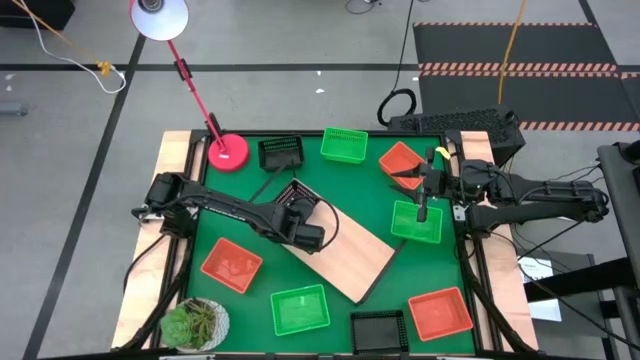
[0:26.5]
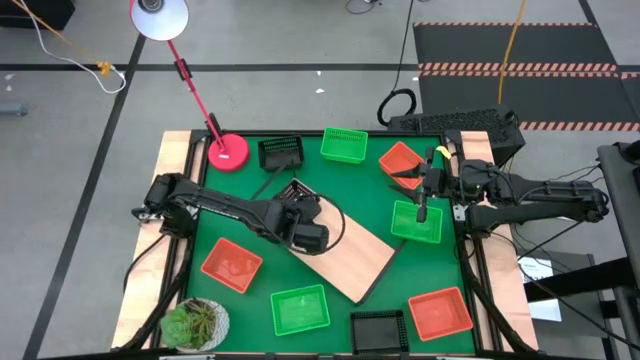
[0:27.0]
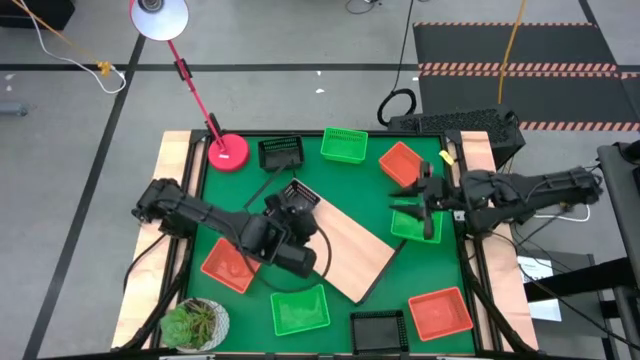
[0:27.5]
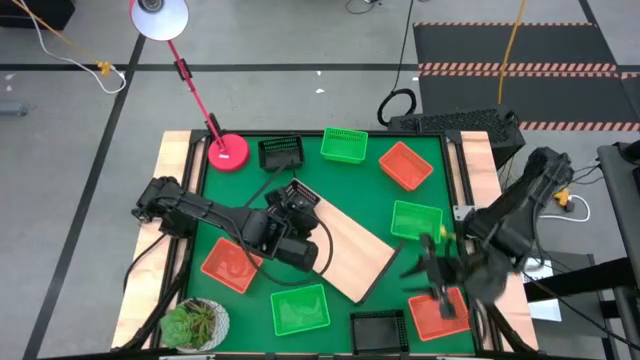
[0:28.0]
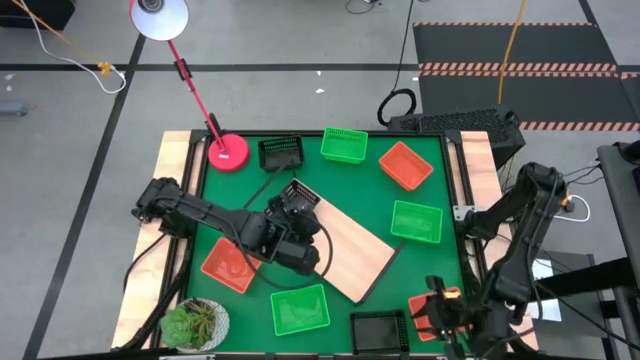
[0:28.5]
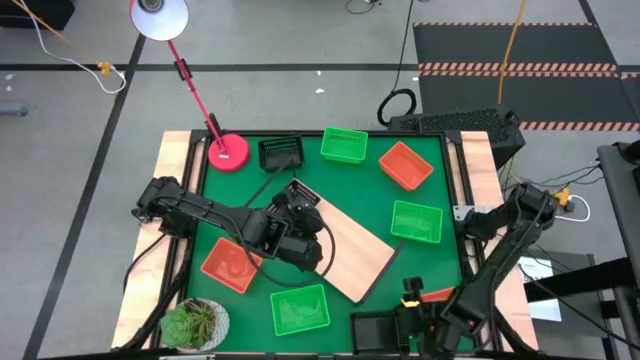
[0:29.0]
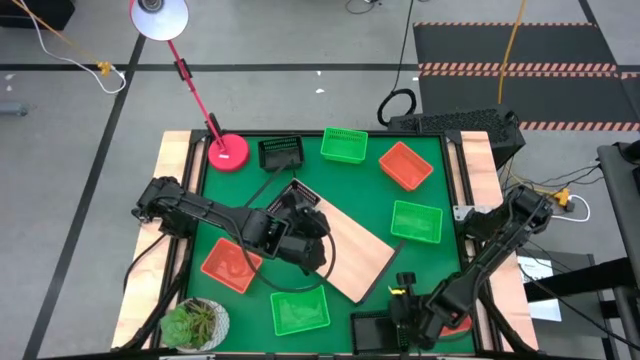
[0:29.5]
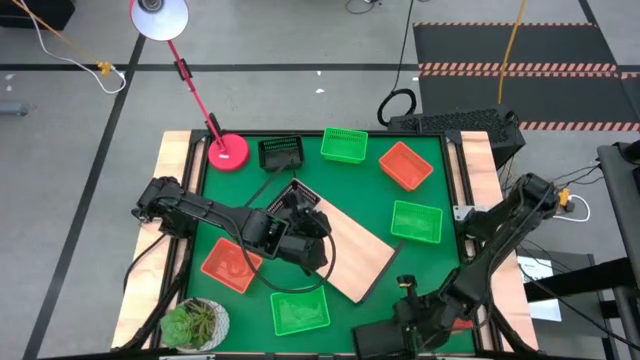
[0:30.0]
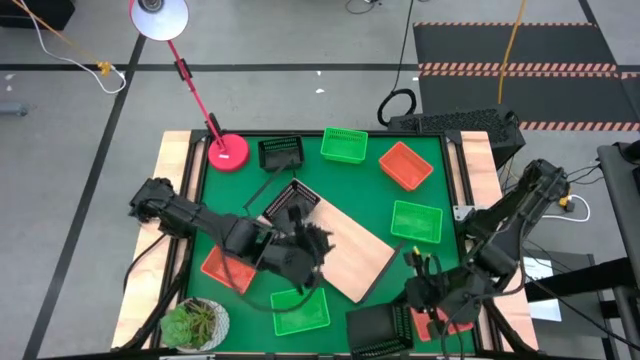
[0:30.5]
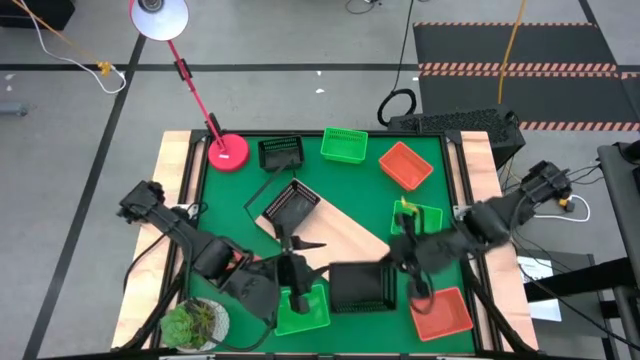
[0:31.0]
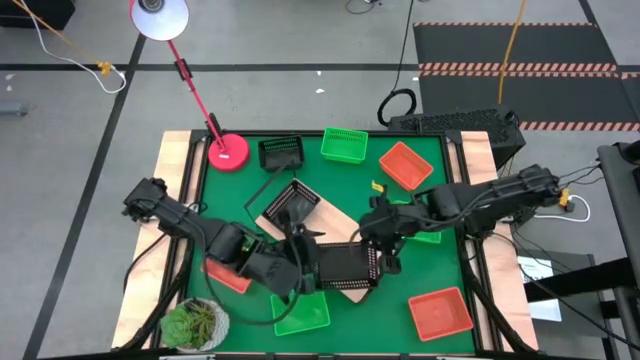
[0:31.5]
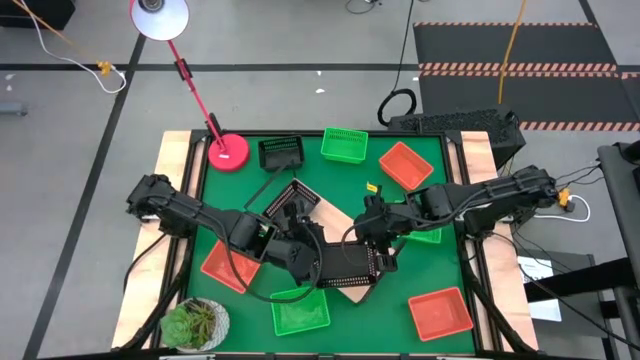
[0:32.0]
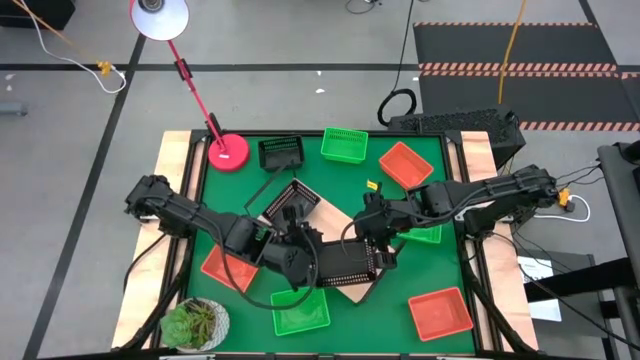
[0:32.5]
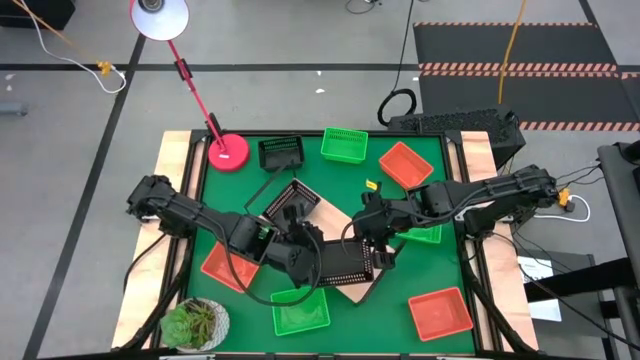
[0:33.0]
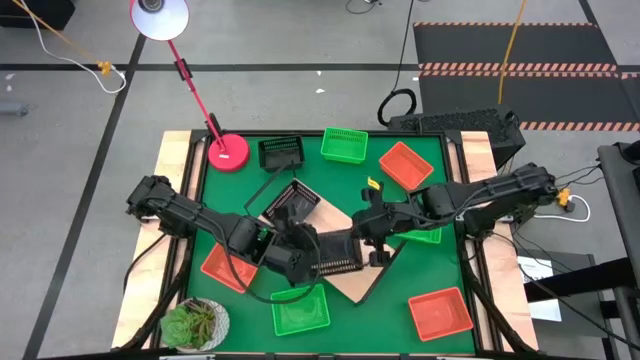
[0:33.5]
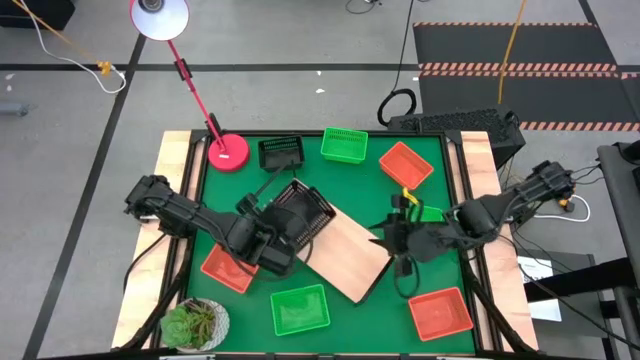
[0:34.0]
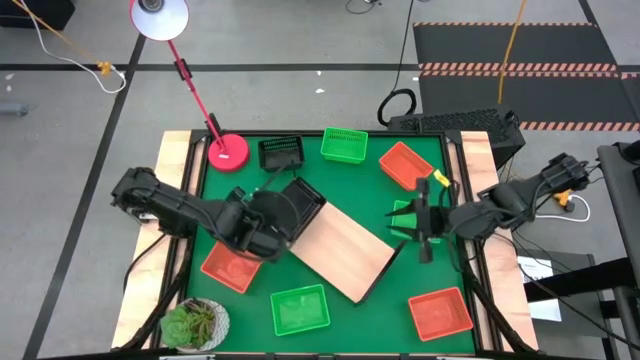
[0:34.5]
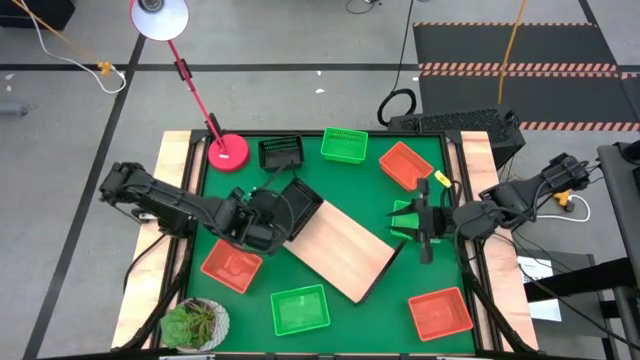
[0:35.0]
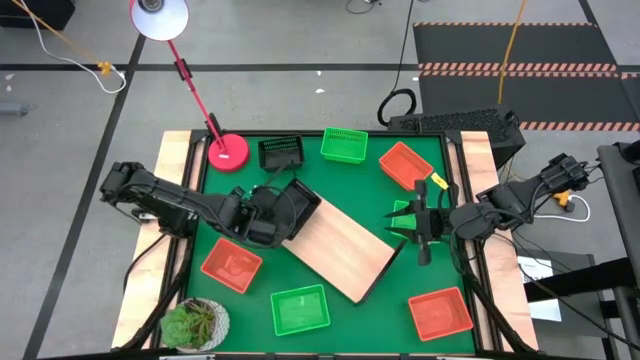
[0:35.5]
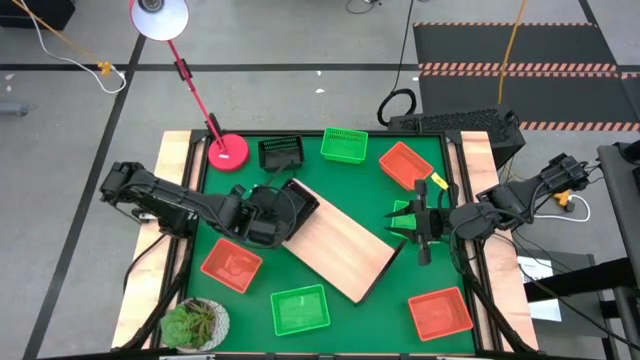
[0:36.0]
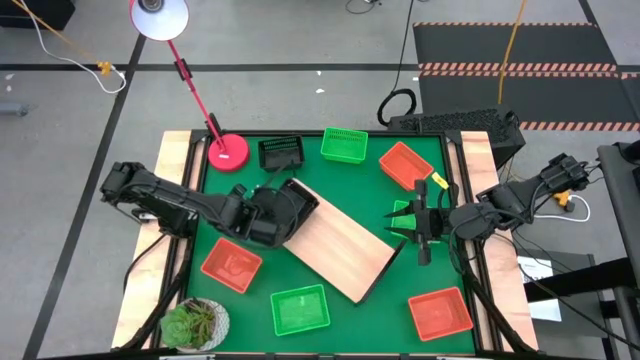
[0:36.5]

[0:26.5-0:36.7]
Task: Stack baskets on shelf by color
Stack the bottom black bin on the black bin on the shelf

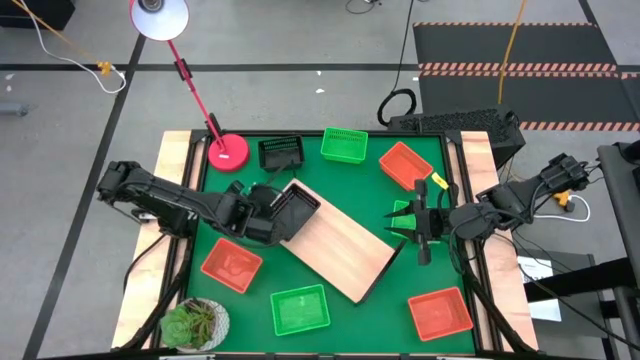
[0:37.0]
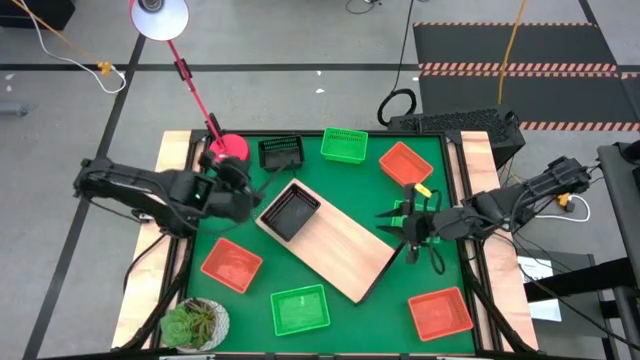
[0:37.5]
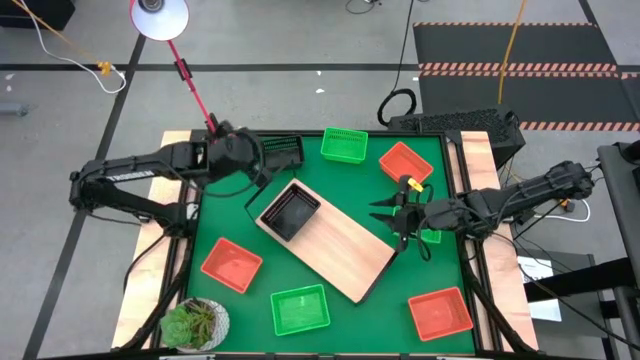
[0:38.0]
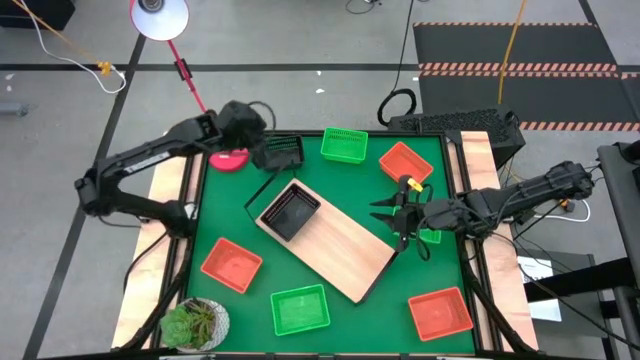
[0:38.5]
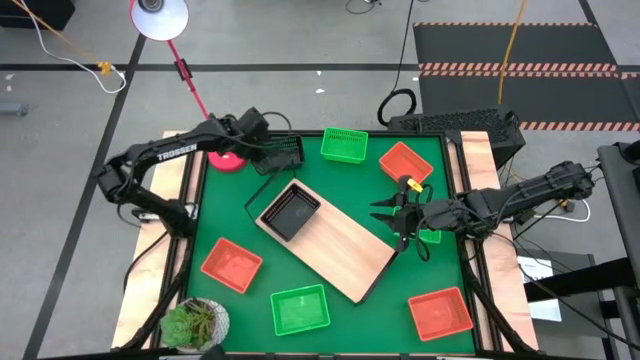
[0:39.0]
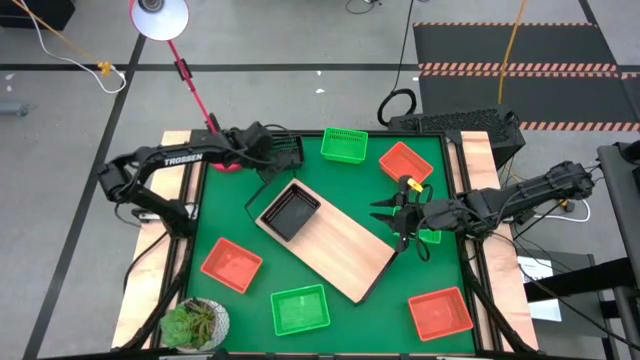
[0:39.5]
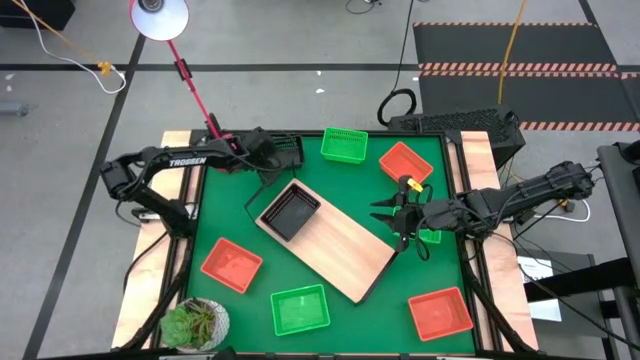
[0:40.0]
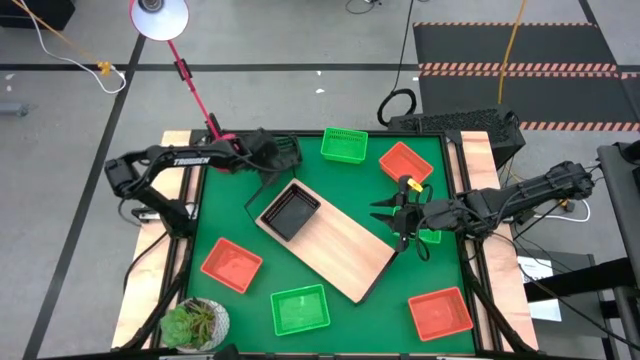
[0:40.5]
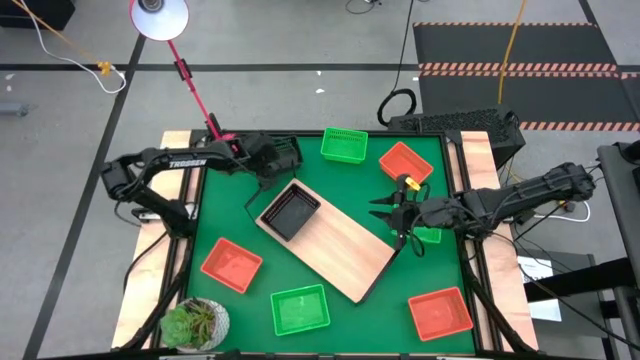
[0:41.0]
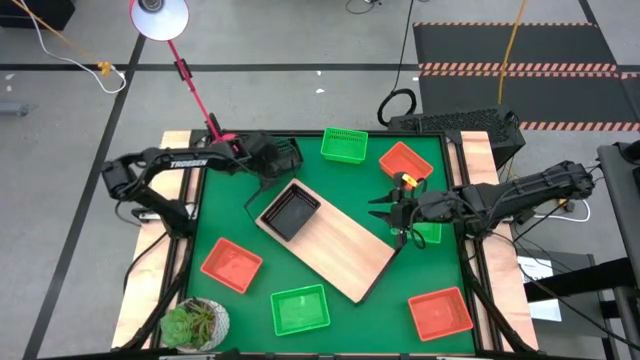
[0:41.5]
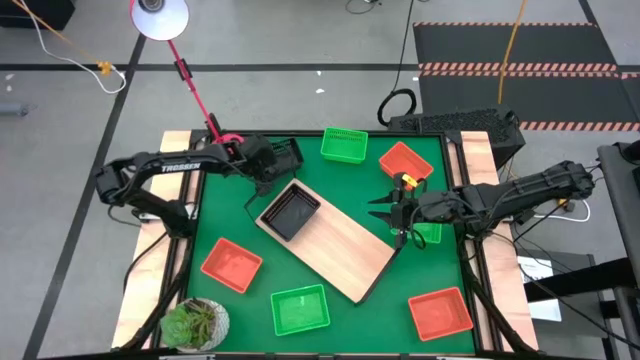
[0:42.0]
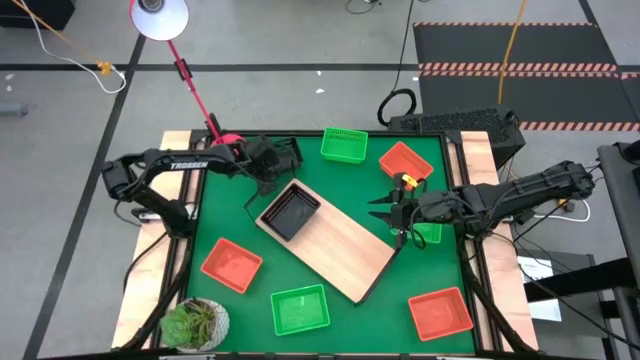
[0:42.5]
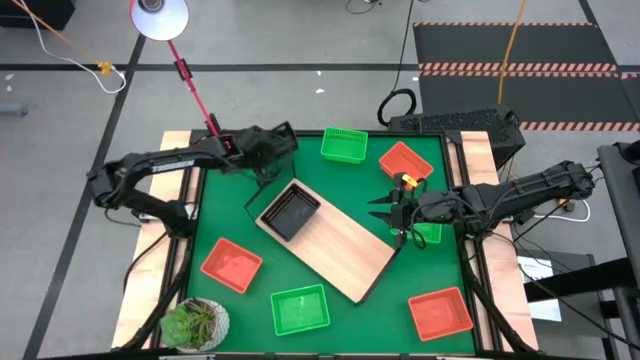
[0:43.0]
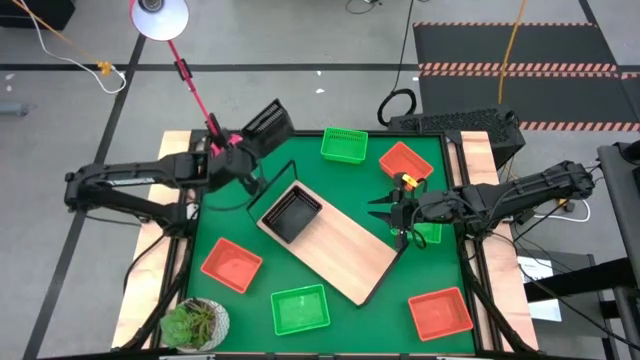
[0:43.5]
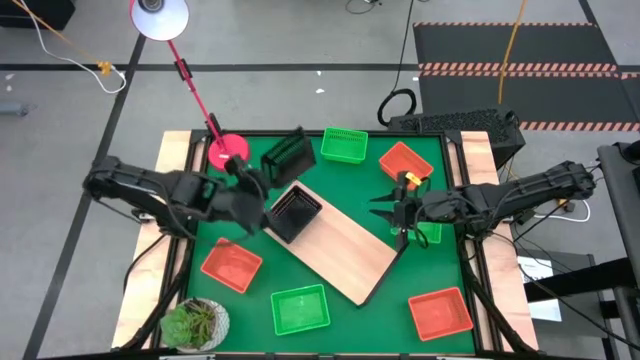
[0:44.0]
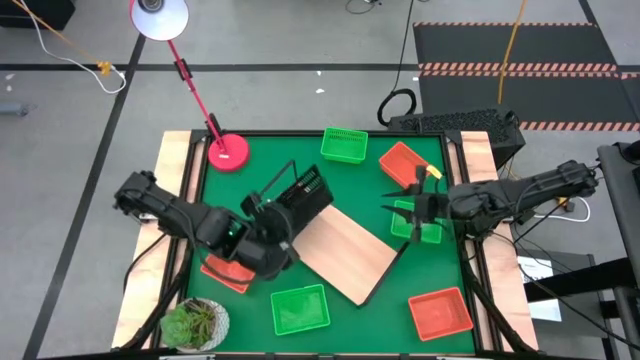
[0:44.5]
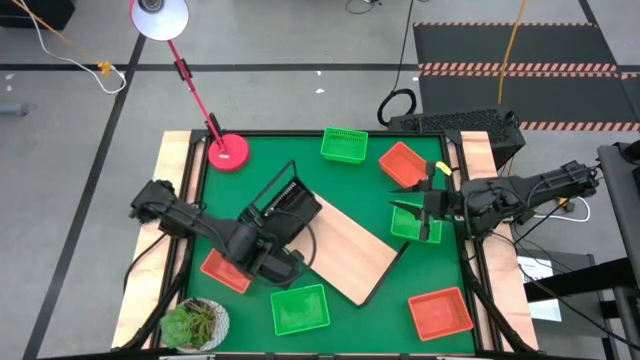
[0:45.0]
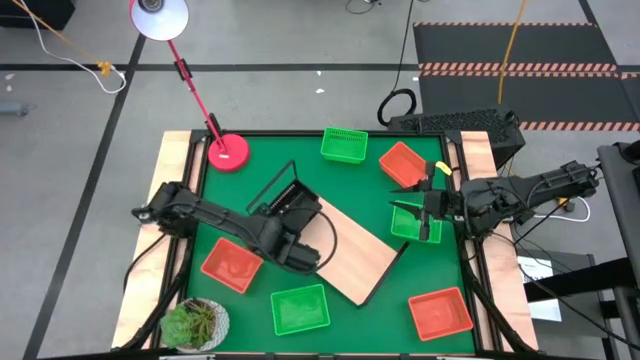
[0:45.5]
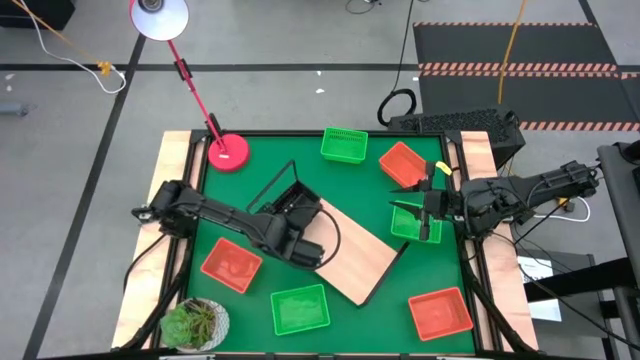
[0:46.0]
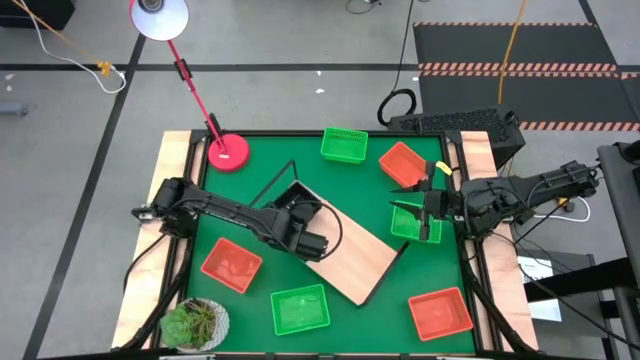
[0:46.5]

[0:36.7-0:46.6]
Stack the black bin on the black bin on the shelf

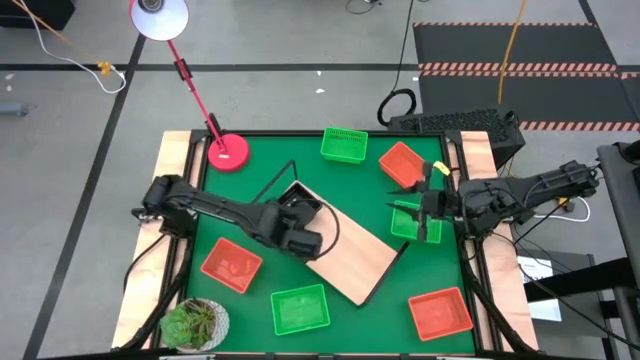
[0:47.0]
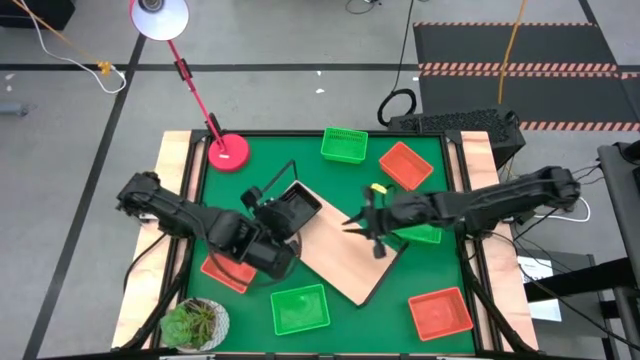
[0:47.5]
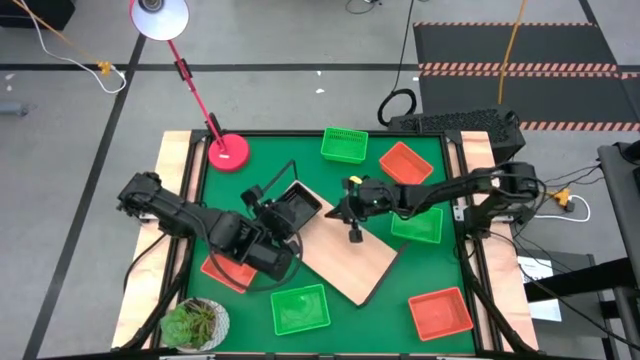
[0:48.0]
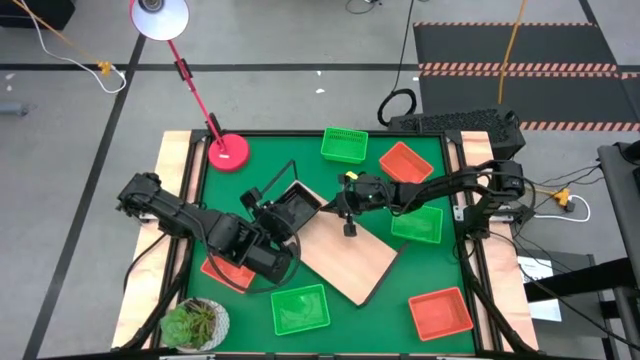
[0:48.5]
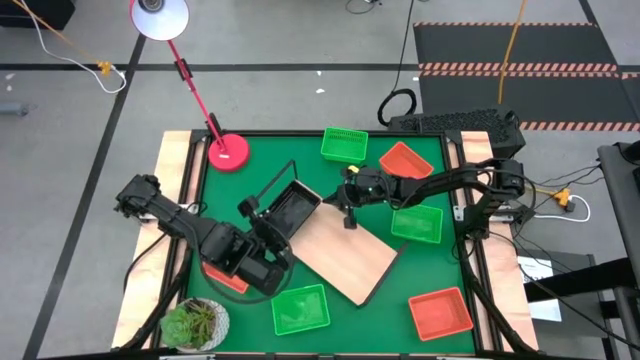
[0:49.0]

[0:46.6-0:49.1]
Adjust the stacked black bins on the shelf
